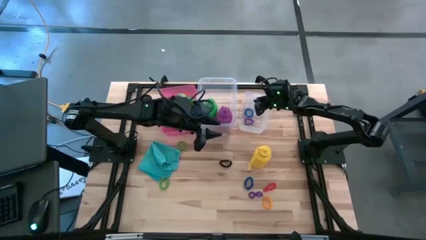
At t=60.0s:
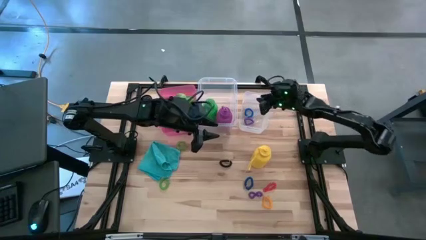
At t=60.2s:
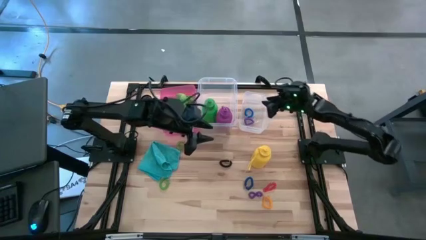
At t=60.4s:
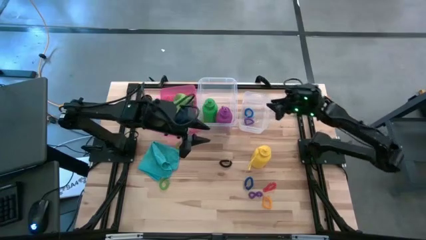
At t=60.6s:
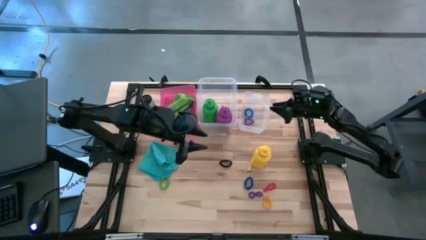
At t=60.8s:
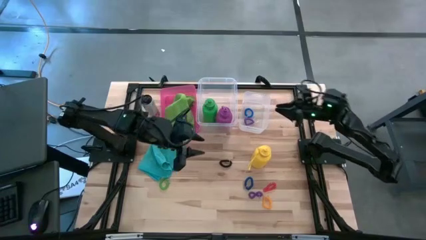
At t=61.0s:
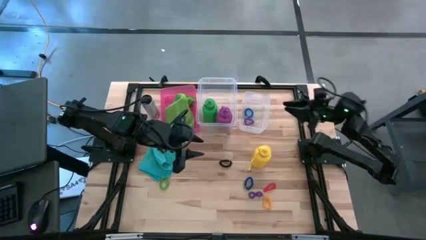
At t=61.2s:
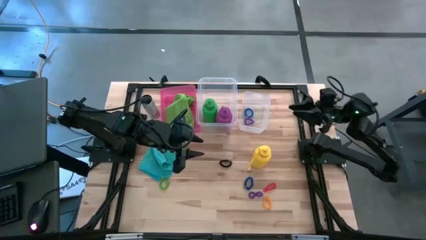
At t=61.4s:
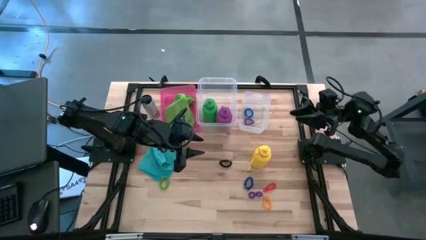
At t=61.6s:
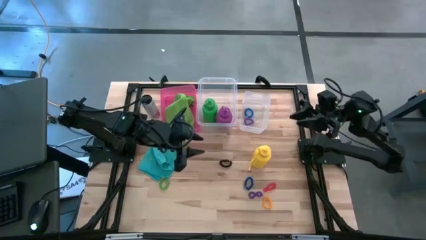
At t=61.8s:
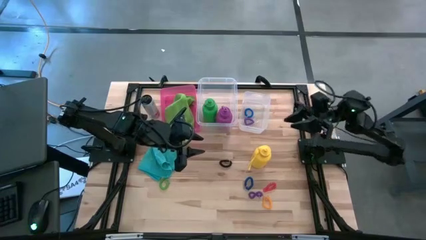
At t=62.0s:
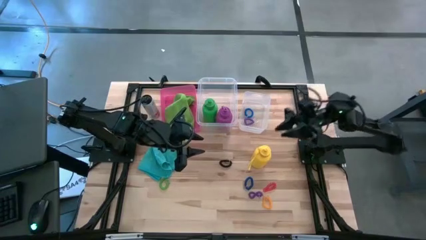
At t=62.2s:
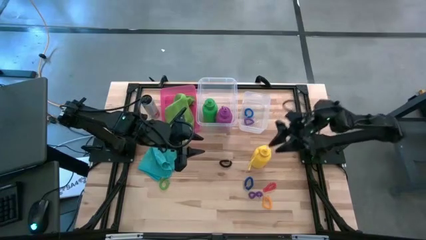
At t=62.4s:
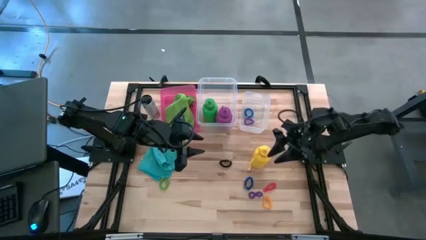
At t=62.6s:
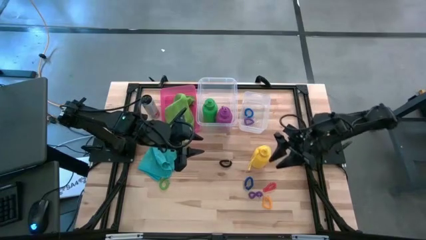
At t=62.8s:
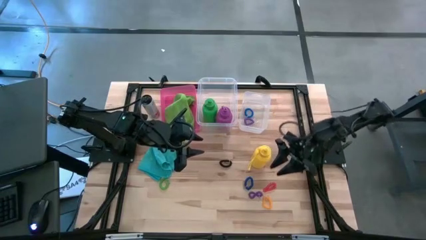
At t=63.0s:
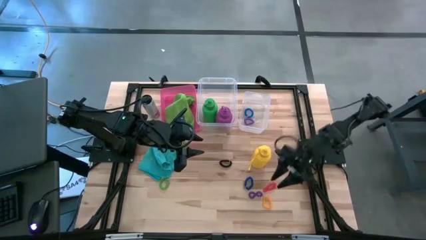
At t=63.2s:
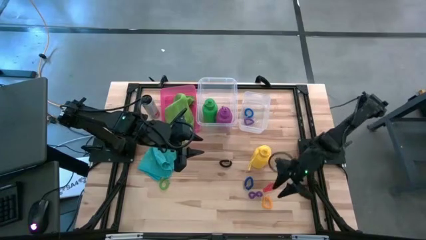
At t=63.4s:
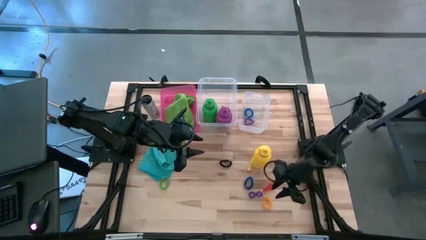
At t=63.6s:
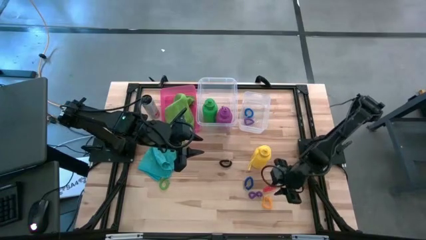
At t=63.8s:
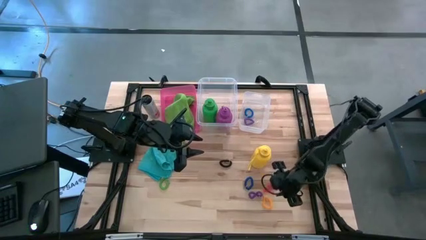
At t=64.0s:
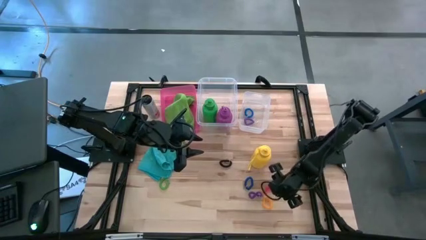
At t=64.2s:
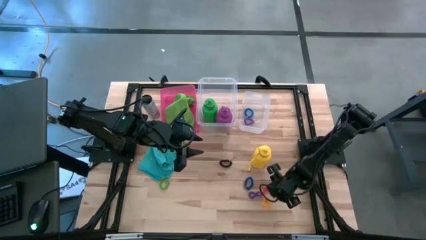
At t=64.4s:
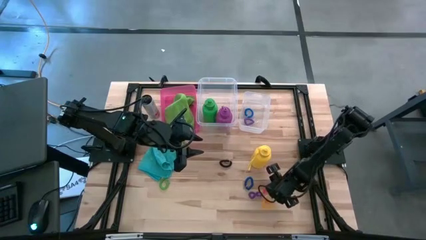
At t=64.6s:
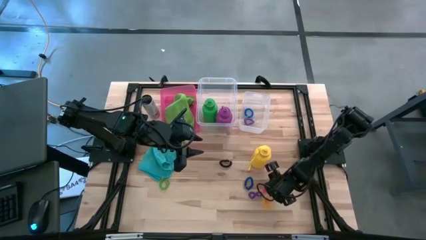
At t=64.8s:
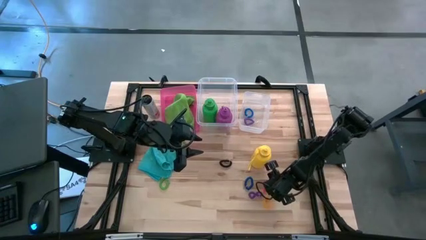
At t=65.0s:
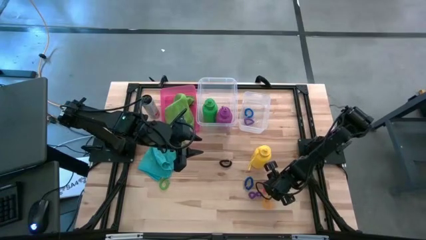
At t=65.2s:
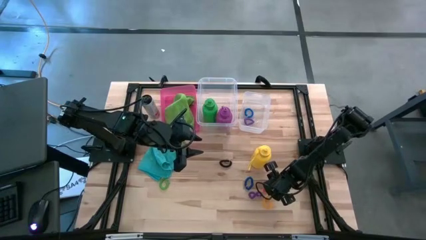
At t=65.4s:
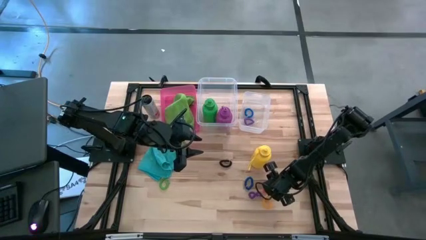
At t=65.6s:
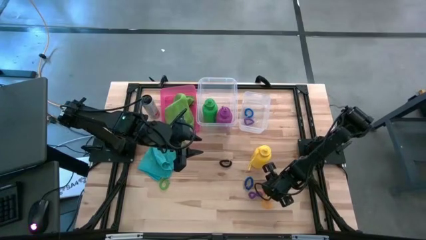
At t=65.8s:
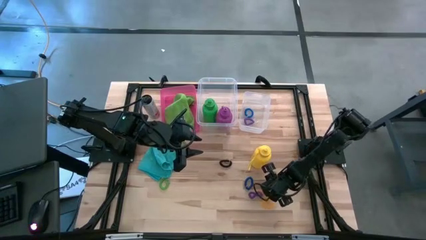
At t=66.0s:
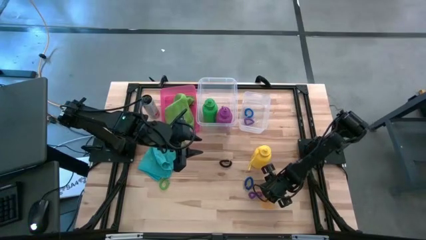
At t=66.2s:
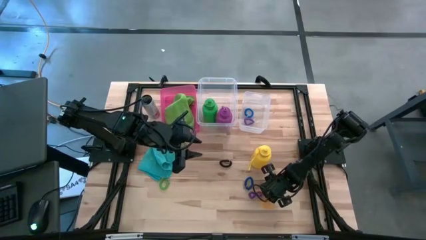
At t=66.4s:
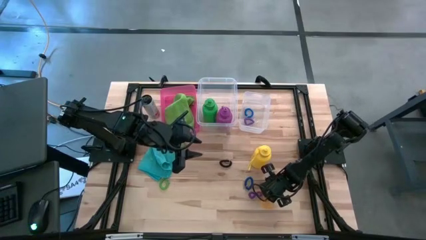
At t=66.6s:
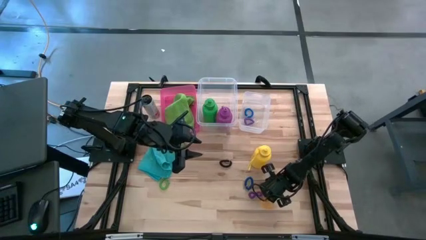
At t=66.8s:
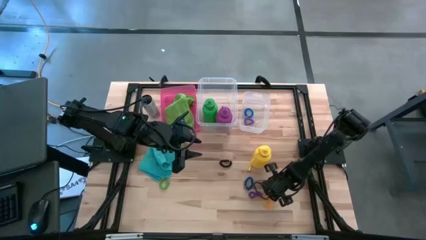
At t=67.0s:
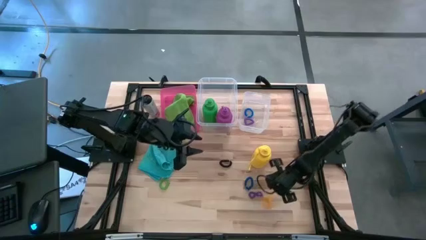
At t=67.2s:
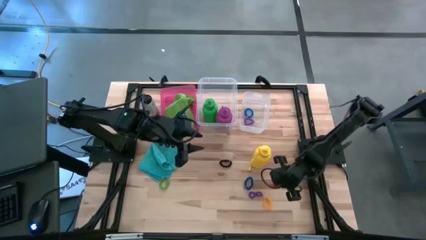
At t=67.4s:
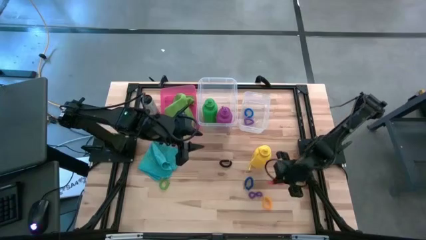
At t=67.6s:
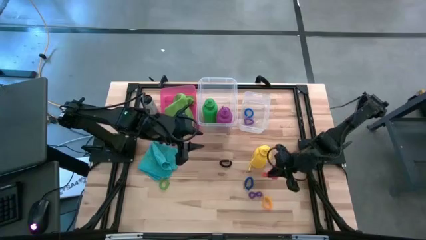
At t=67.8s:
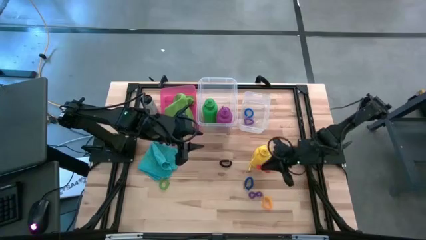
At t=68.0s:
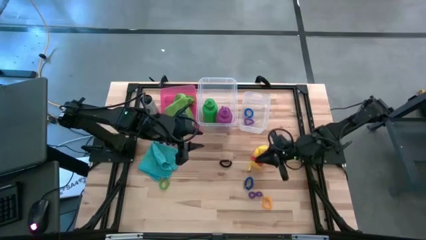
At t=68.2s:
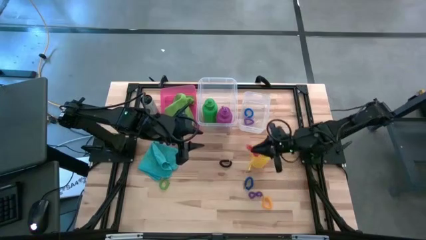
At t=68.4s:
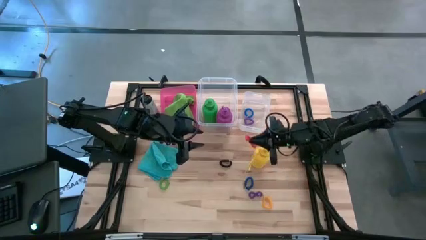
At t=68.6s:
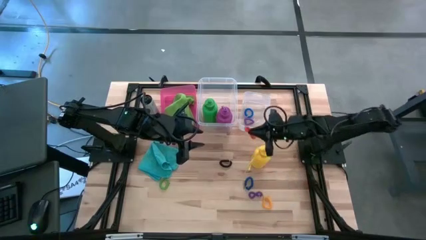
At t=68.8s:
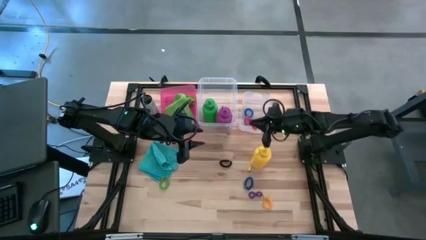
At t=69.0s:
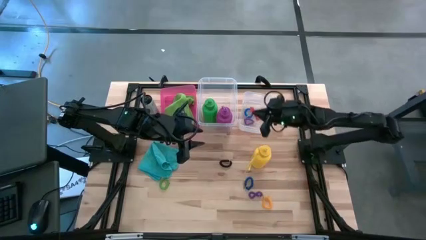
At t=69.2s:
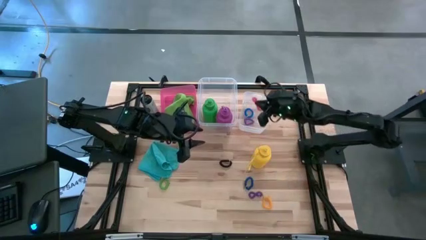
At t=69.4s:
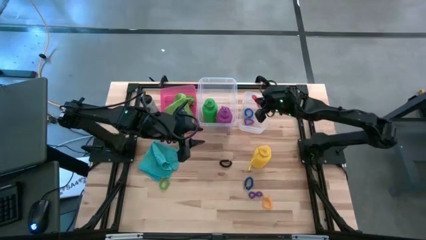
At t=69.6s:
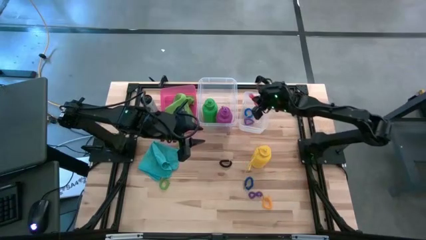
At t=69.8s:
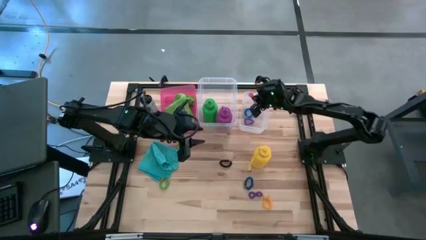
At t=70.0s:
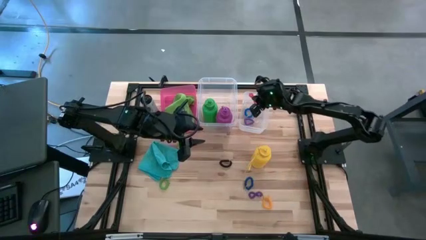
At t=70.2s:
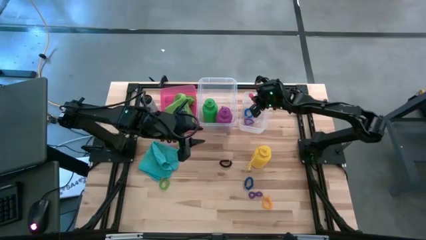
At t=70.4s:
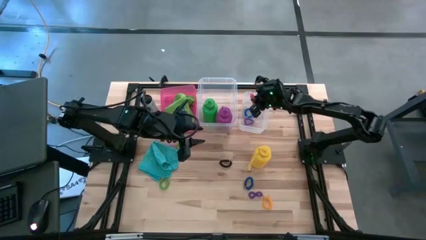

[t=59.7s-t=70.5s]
Task: Pick & Place Sports Items
Put the orange spring keychain into the right transparent bin

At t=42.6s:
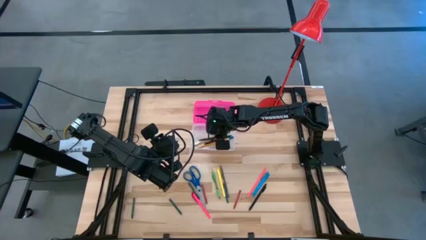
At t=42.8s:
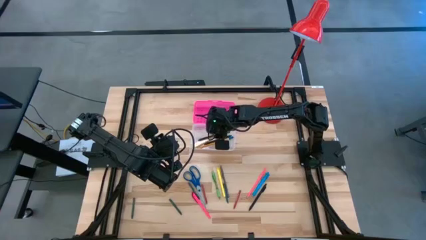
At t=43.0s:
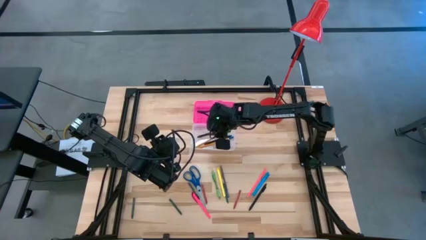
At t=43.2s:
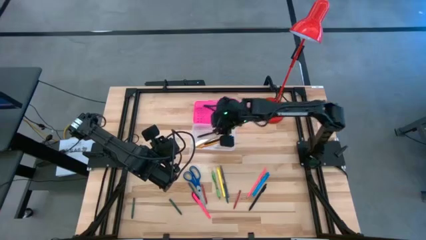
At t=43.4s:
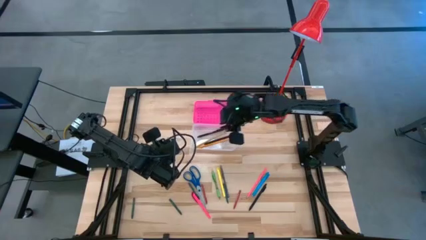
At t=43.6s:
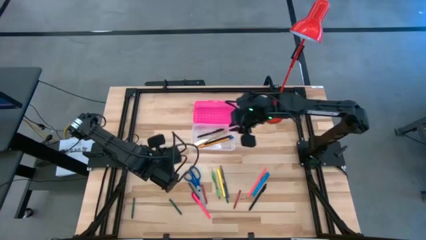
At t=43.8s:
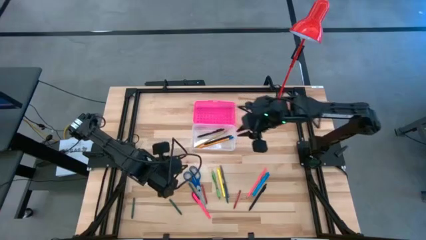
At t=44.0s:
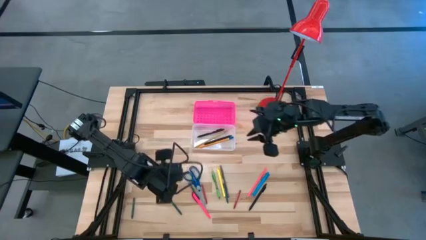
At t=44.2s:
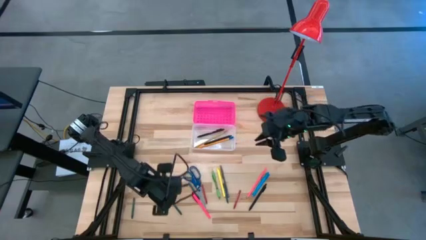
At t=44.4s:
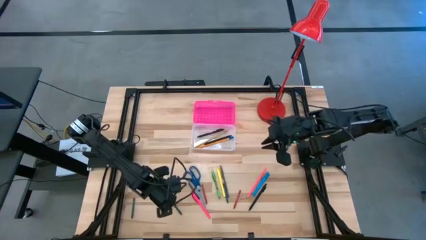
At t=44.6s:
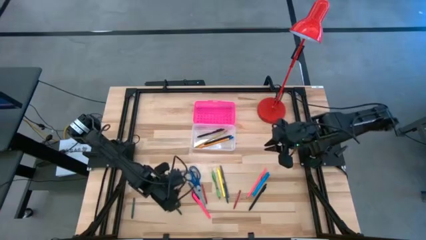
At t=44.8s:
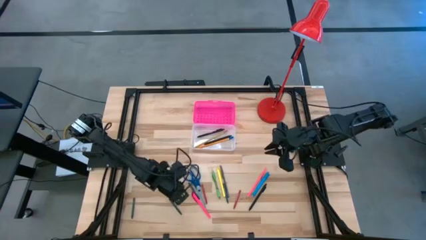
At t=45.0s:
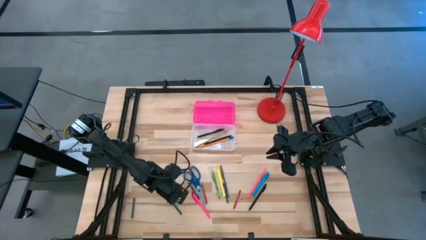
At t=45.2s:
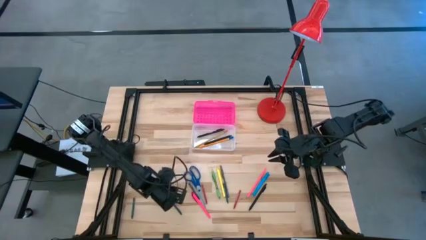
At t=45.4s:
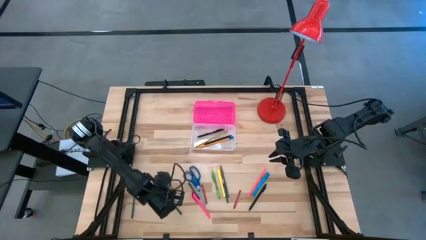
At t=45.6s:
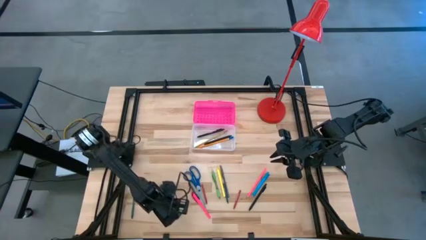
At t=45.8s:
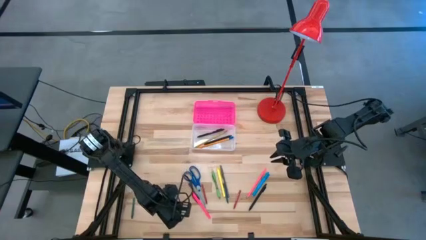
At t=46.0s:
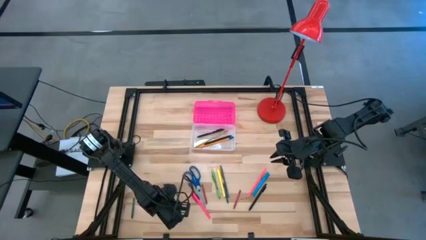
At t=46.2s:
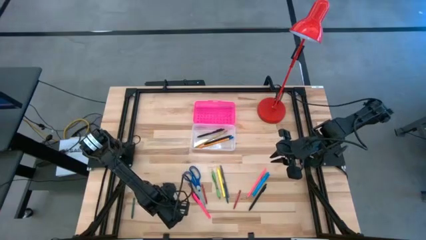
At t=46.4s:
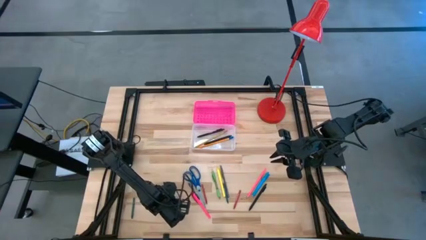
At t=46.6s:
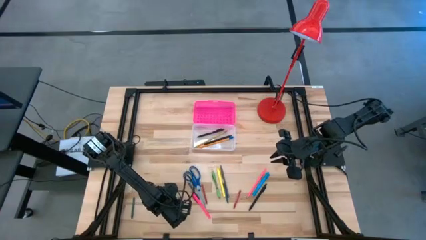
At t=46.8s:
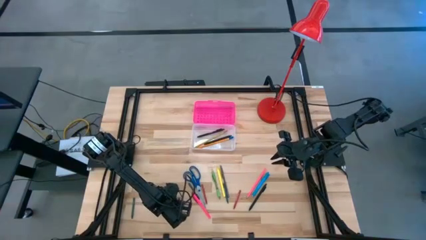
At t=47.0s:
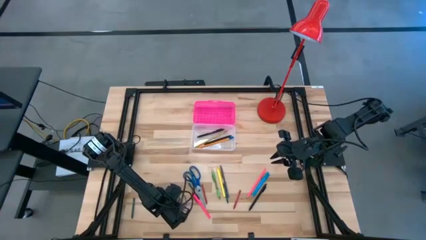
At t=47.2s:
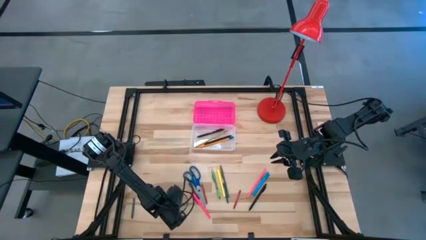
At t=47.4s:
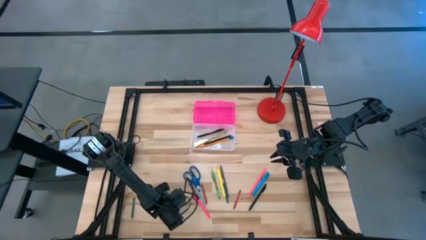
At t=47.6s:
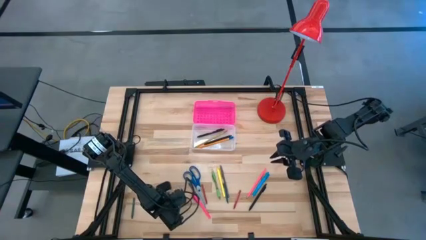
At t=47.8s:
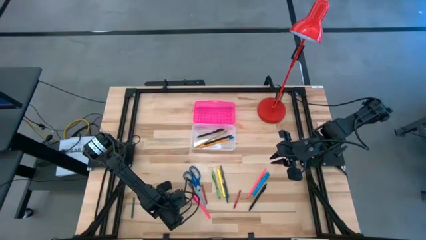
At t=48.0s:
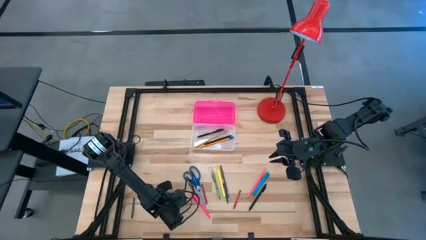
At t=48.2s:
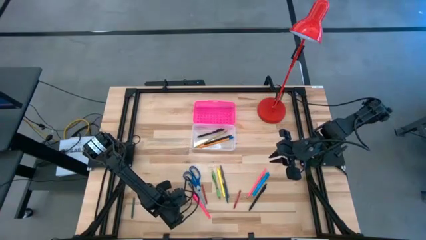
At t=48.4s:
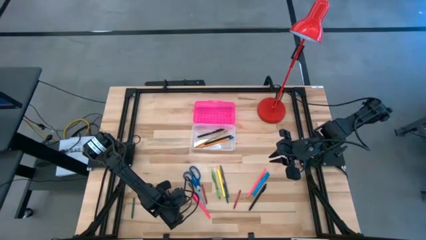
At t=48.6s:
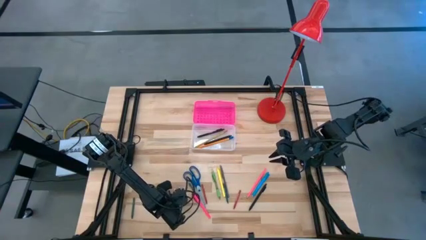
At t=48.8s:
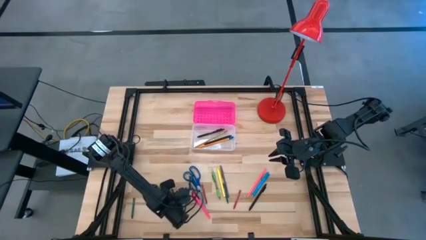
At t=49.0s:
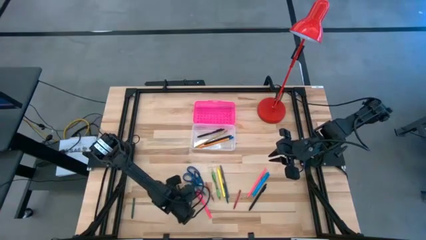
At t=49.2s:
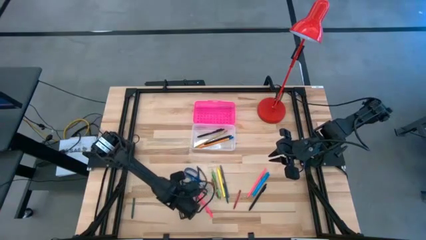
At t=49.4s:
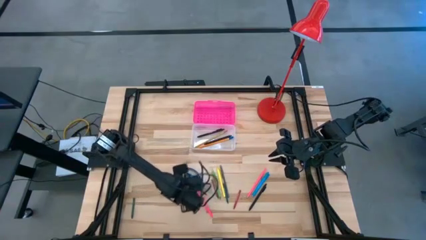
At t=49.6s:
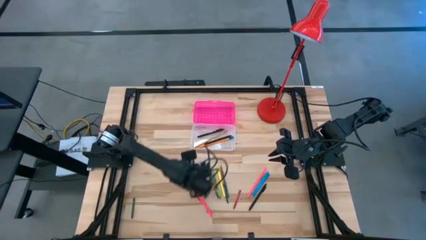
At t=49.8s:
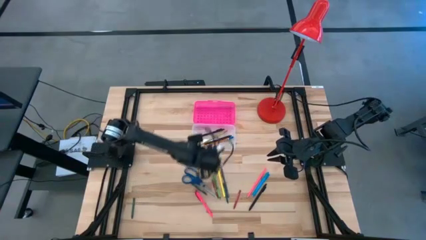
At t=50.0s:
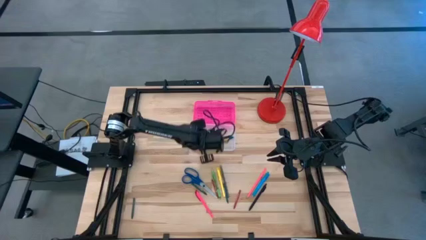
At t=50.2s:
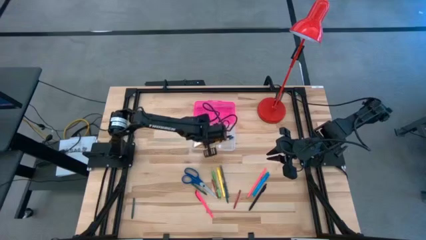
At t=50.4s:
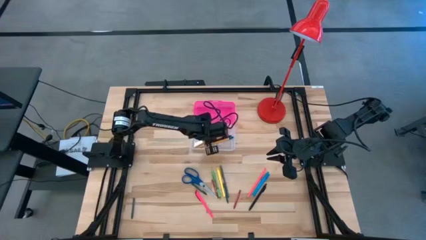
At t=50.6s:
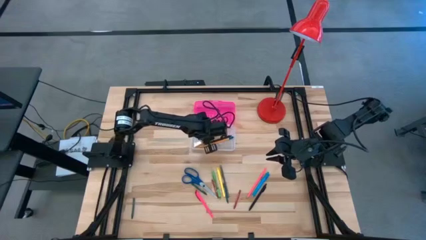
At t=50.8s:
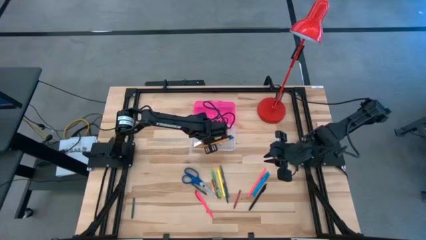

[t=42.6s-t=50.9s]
Task: Pick & place school supplies into a supply box
Put the green crayon into the pink supply box
